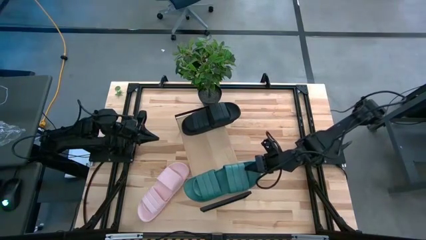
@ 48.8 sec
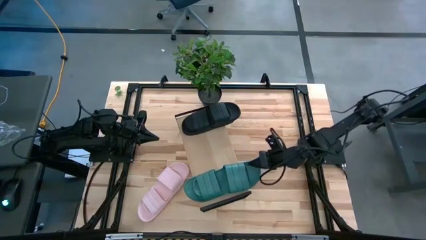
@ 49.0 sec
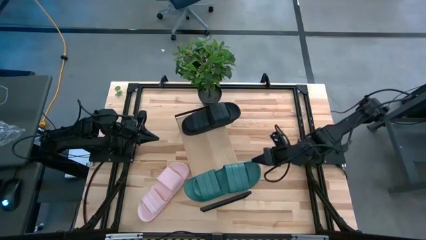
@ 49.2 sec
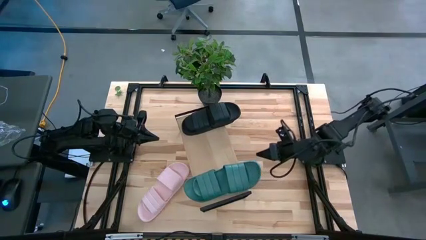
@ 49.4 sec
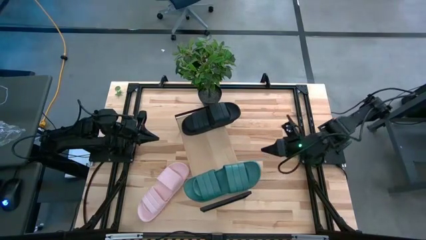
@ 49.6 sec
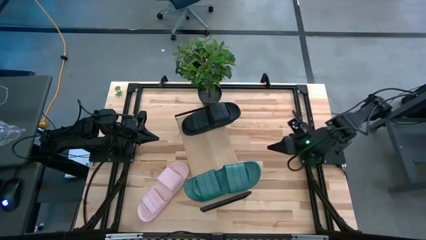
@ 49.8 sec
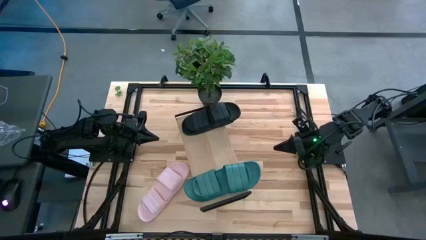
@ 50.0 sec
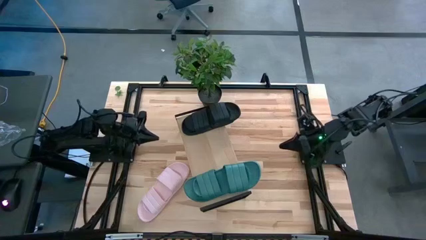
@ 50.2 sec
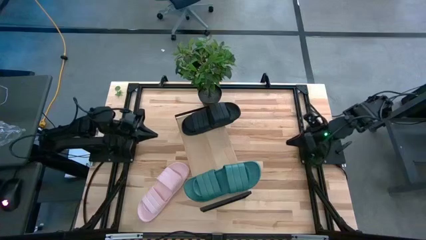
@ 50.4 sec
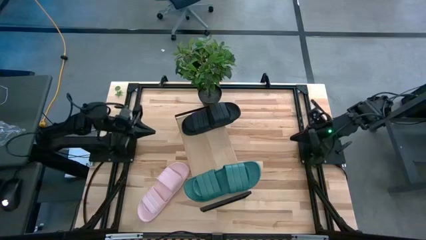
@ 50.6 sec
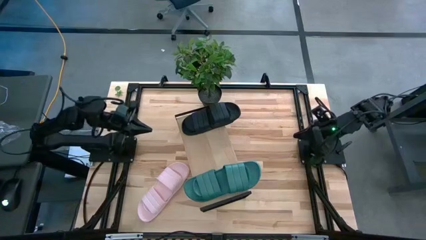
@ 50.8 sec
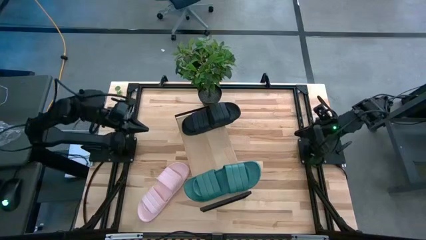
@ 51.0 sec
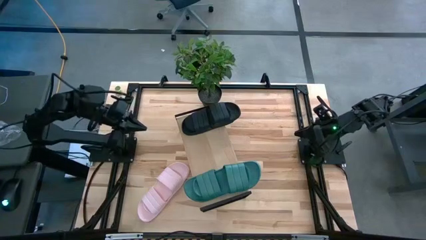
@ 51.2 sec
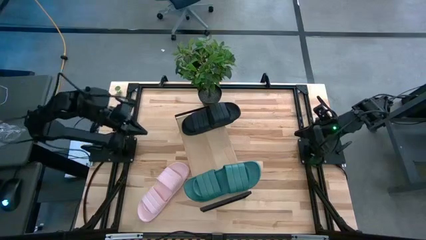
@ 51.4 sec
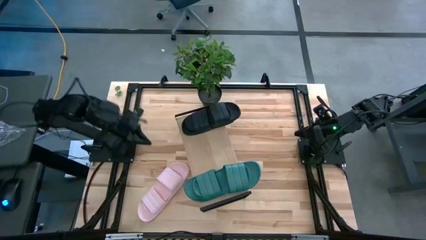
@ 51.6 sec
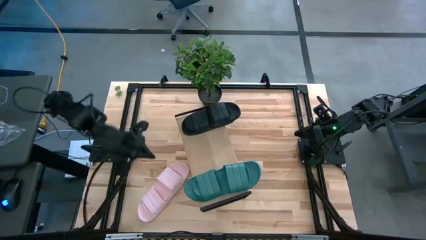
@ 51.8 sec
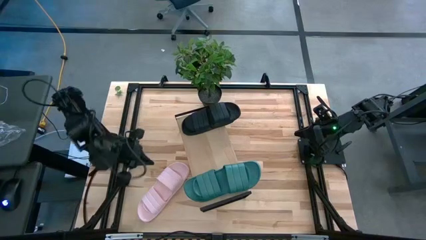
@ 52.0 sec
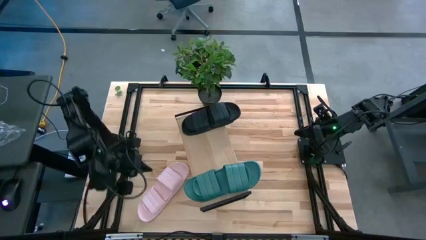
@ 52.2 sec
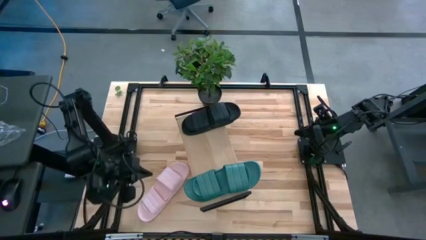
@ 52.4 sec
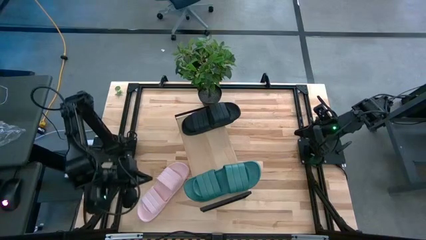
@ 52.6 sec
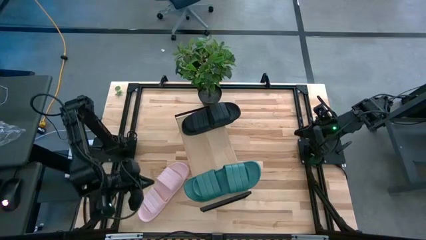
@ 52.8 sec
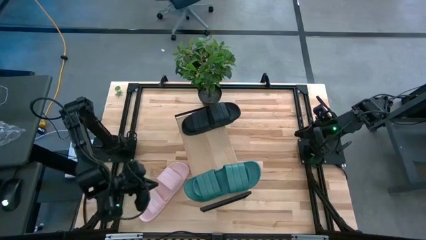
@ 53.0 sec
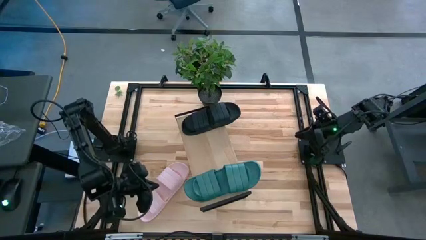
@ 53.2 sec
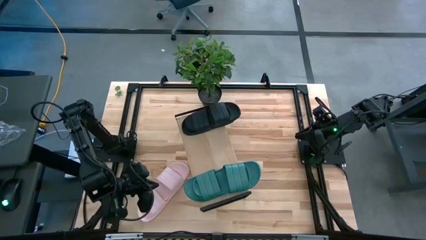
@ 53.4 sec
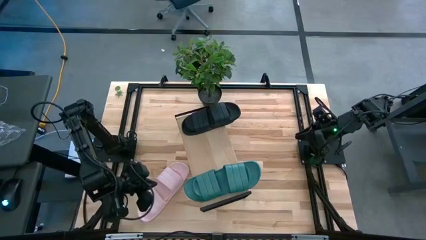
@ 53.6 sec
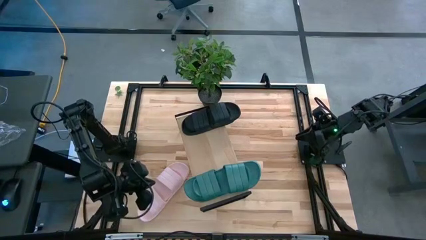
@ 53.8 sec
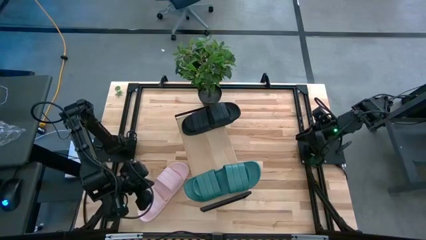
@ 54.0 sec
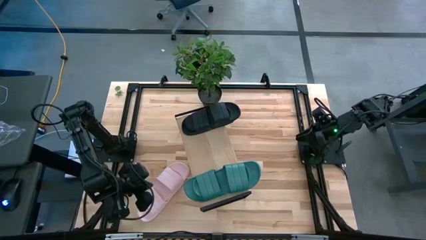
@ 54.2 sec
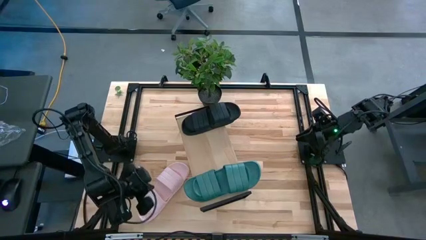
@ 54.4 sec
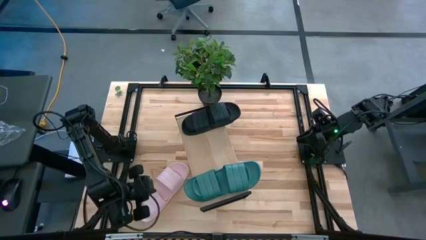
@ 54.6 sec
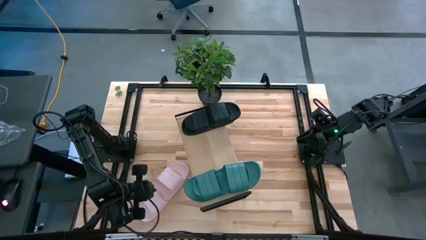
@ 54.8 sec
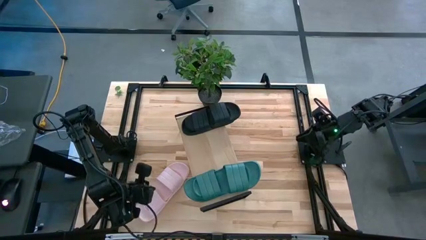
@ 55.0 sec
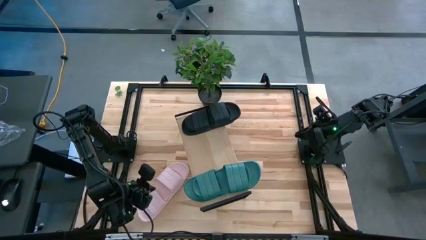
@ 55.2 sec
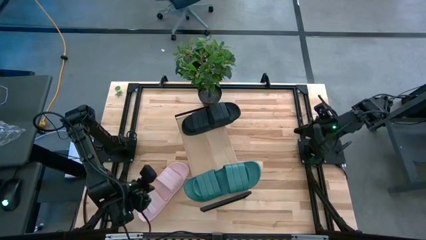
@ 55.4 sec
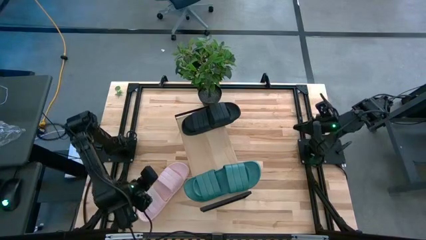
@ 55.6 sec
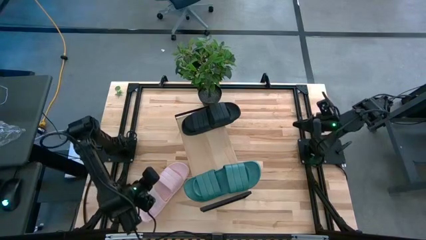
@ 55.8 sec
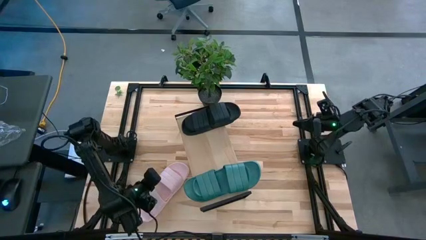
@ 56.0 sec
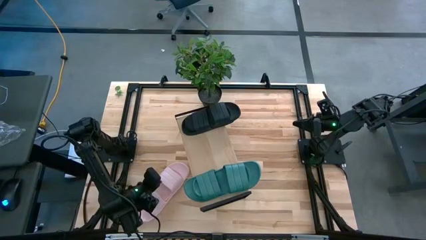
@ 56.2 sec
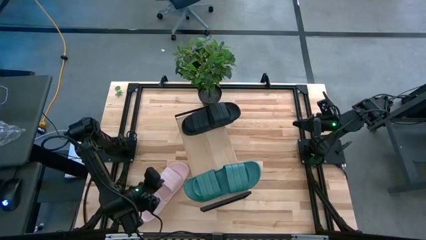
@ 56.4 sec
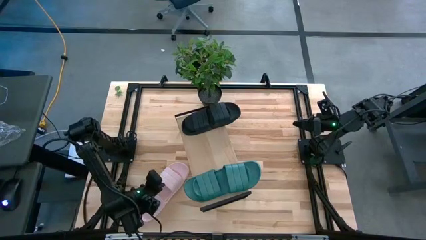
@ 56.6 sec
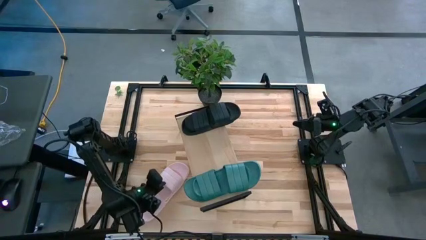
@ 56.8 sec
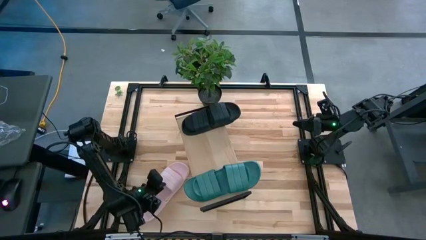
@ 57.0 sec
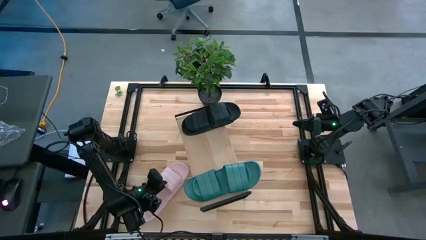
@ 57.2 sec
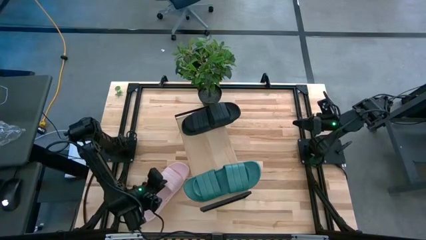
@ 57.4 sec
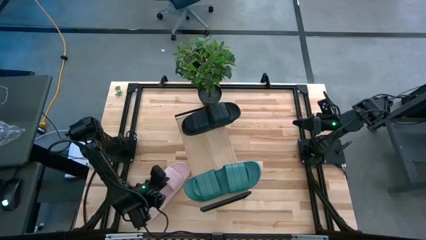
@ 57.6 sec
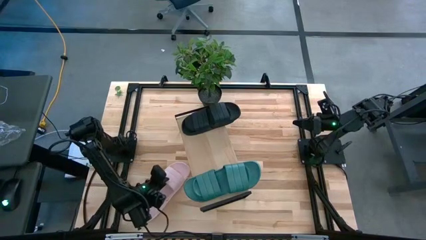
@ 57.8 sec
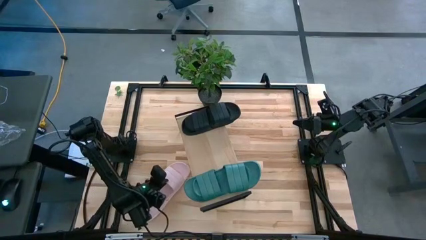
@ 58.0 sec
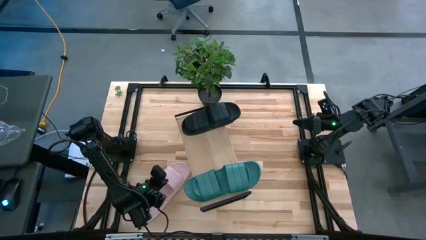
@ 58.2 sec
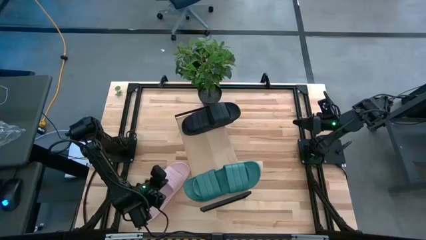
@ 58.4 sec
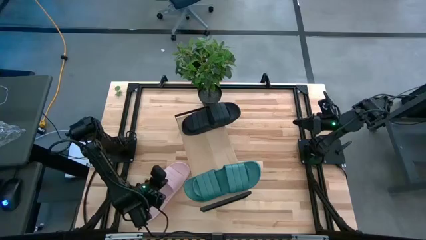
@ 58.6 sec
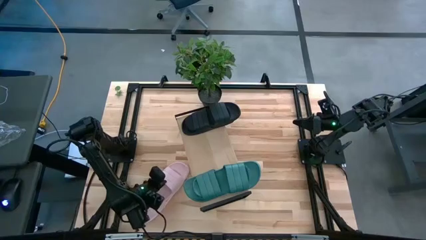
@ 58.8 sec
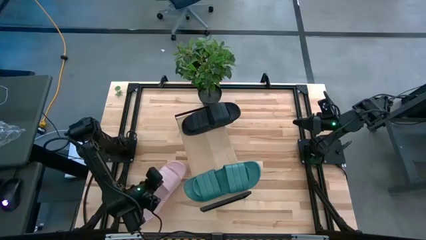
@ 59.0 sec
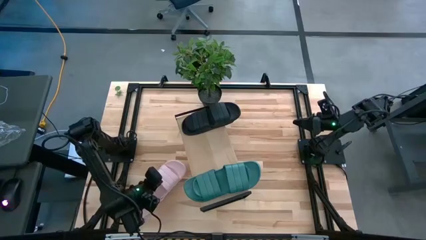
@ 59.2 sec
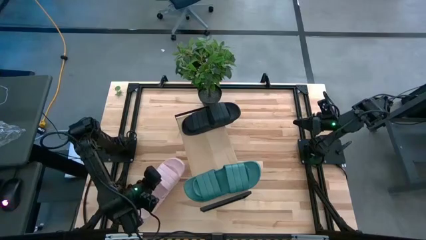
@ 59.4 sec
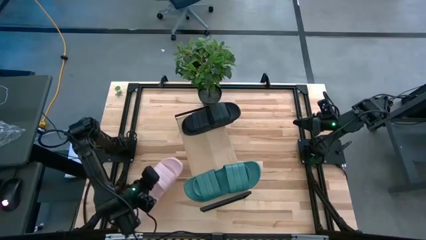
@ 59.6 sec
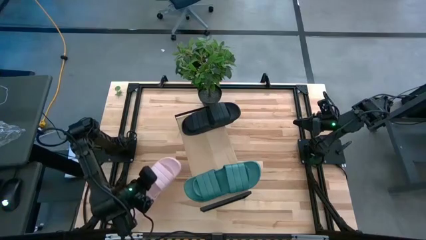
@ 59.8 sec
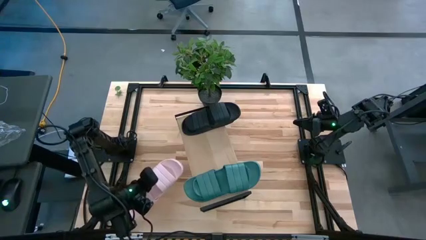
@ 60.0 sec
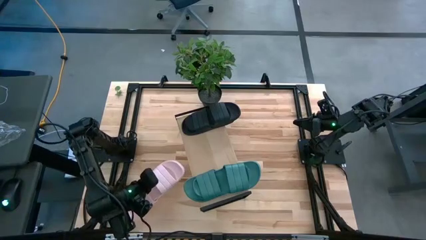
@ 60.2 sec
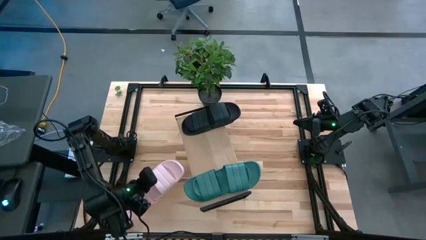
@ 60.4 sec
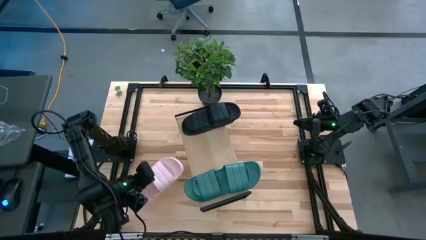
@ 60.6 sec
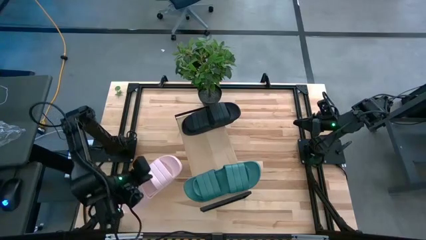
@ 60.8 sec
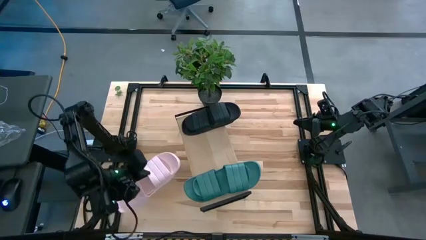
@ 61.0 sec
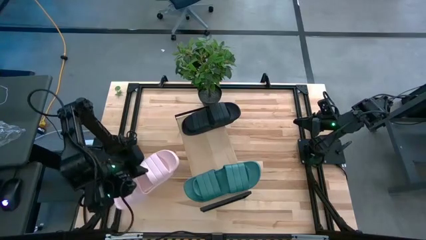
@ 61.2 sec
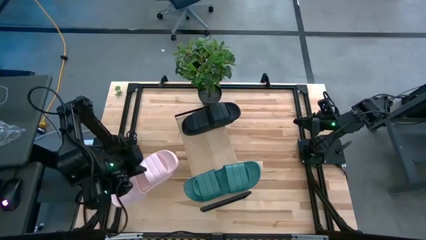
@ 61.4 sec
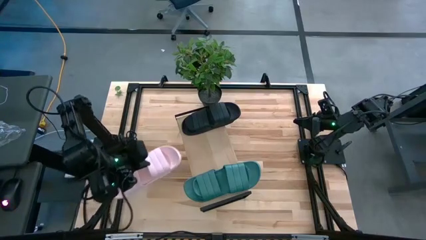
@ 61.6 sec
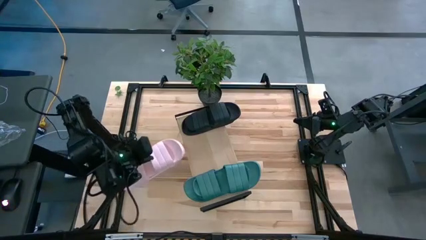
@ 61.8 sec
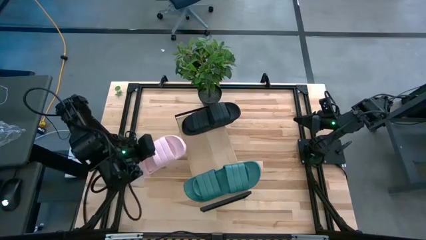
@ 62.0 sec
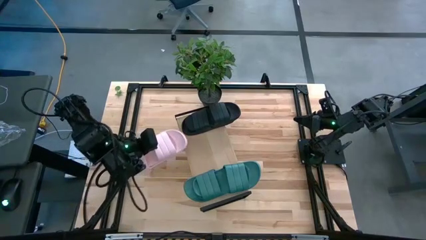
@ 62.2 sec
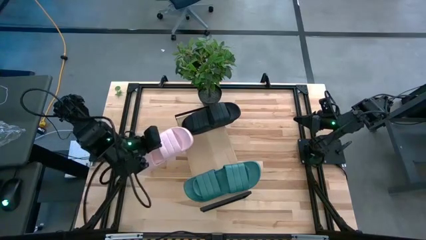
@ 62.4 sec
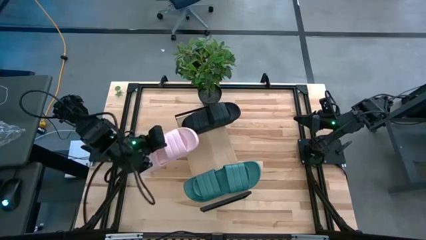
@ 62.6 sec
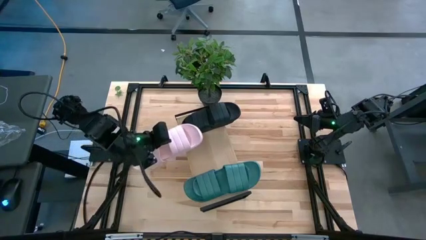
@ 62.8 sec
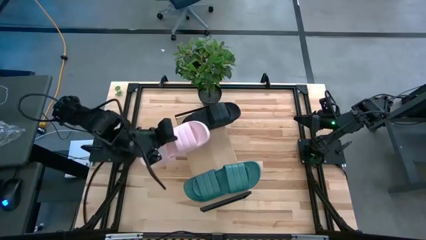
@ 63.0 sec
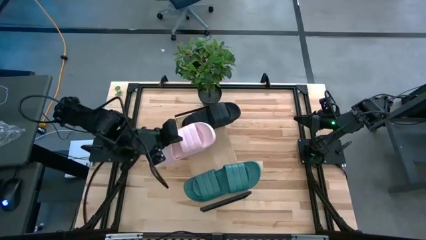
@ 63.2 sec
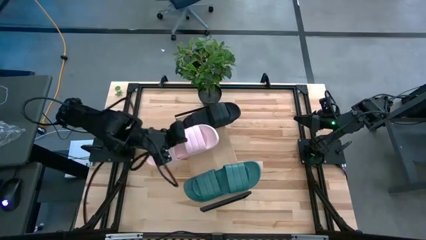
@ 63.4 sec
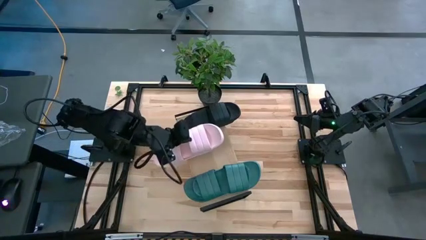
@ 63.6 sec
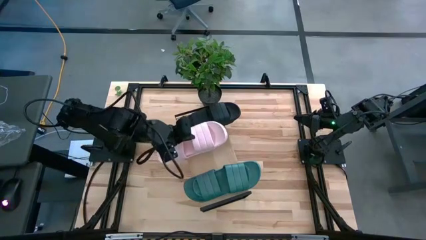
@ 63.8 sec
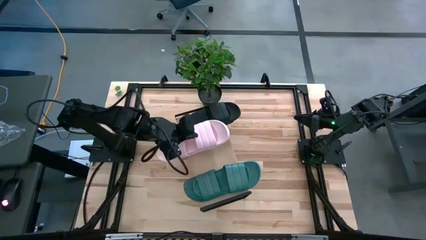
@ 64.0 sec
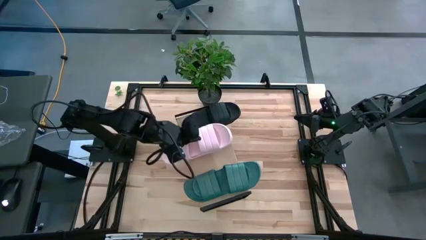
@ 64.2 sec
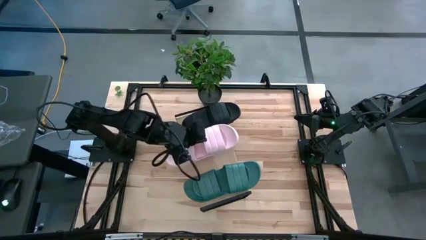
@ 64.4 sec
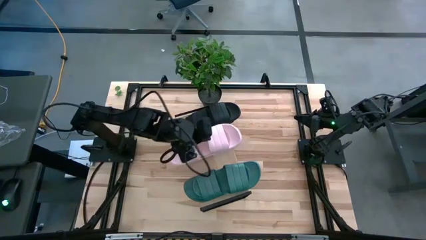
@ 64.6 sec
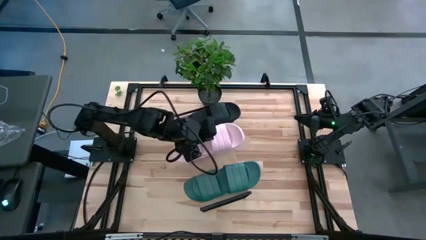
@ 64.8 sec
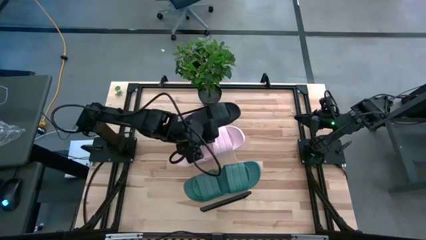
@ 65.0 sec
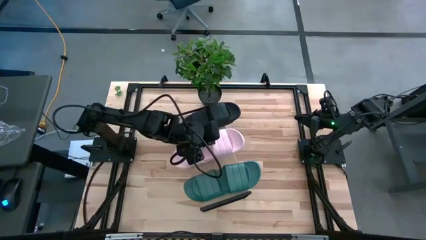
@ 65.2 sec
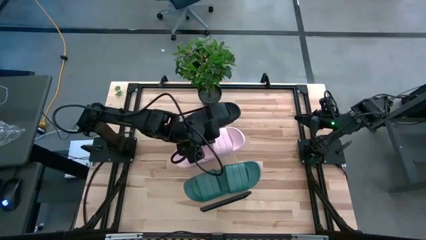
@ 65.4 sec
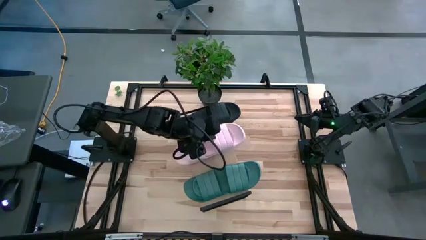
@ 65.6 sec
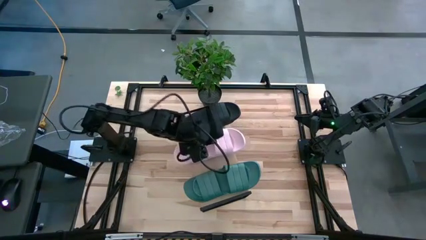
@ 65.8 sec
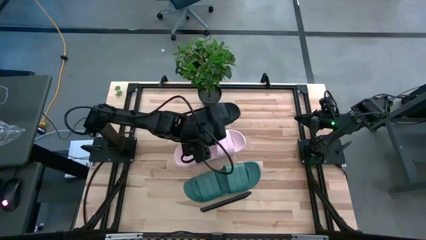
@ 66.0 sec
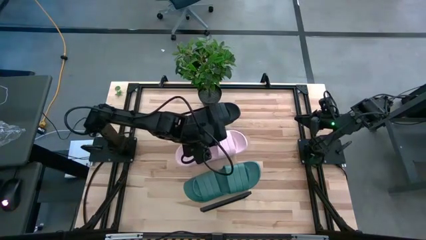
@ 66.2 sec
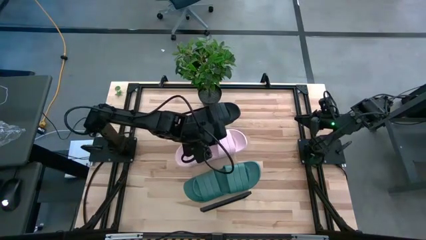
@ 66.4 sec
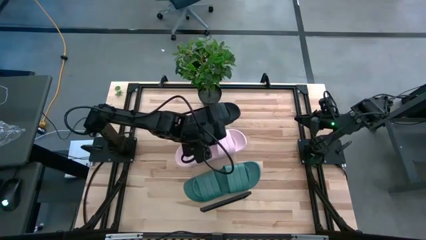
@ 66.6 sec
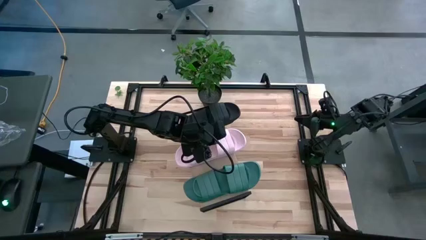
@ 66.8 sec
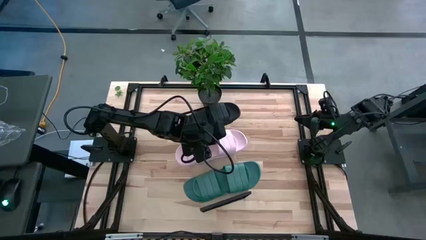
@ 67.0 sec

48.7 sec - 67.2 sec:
Task: Pick and place slides into the shelf
Put the pink slides on the shelf
